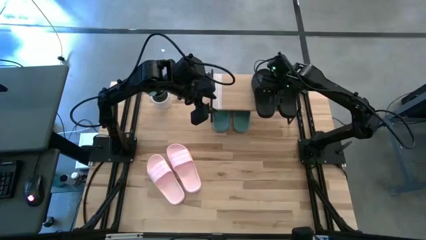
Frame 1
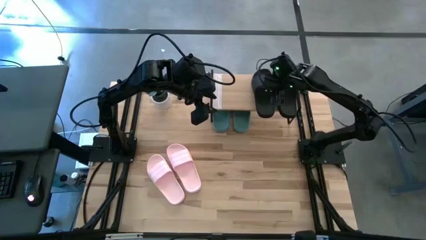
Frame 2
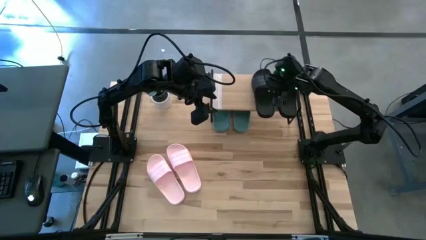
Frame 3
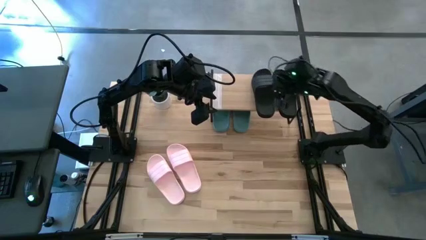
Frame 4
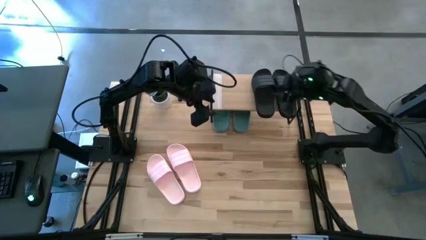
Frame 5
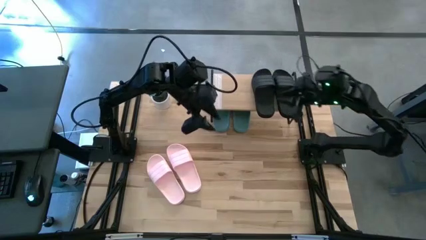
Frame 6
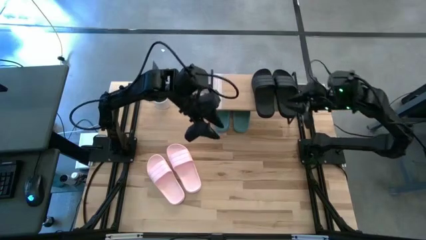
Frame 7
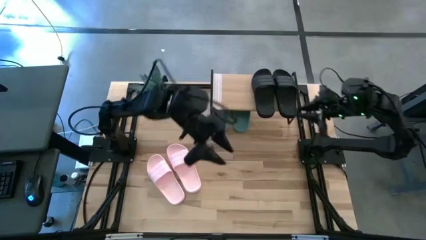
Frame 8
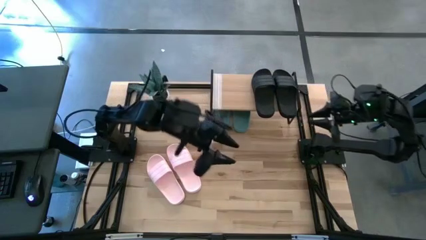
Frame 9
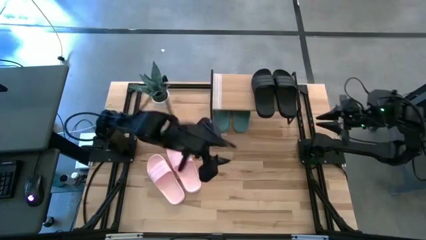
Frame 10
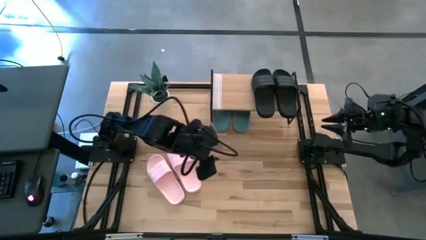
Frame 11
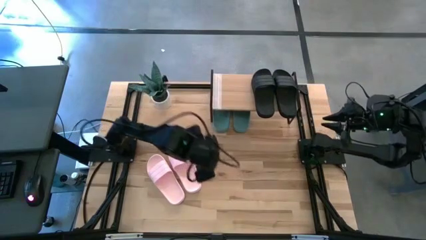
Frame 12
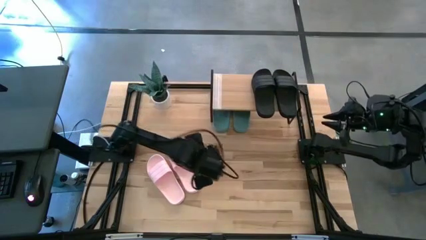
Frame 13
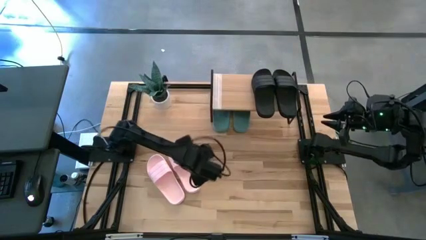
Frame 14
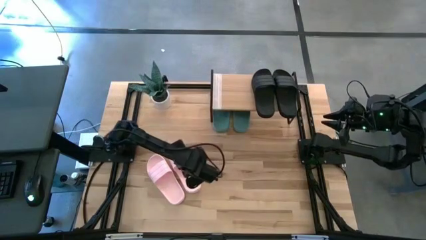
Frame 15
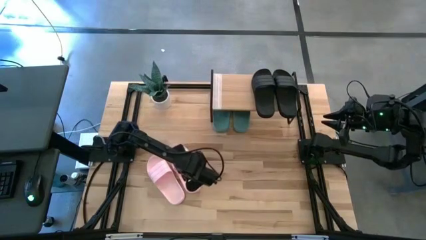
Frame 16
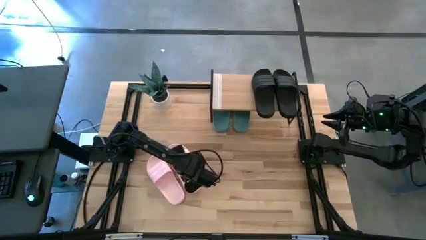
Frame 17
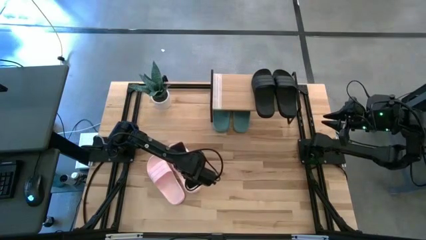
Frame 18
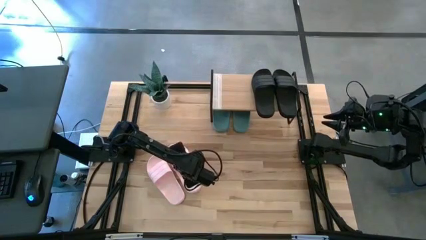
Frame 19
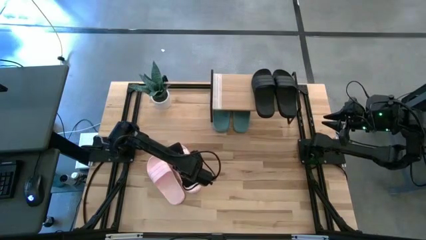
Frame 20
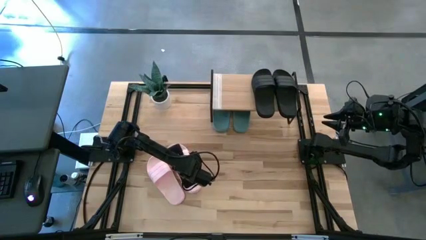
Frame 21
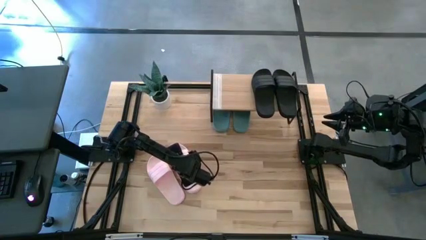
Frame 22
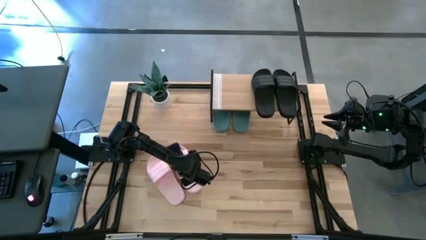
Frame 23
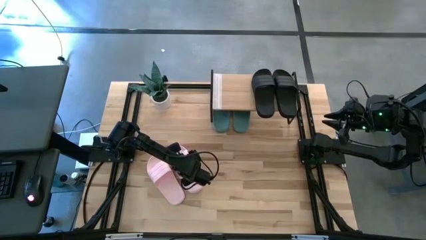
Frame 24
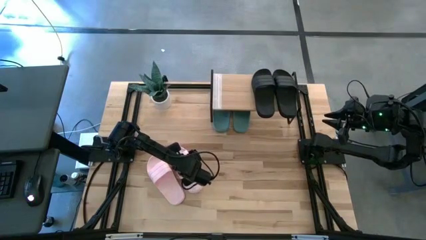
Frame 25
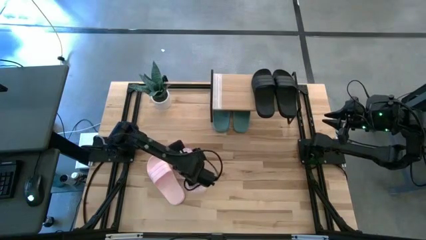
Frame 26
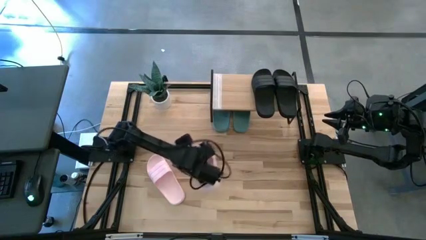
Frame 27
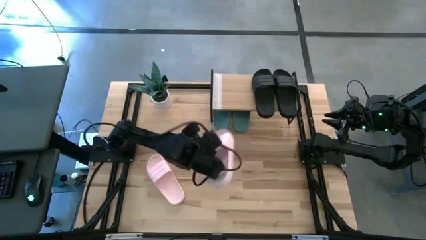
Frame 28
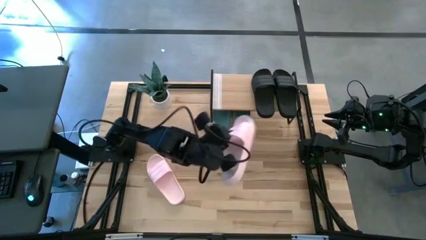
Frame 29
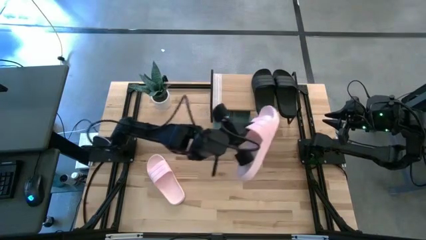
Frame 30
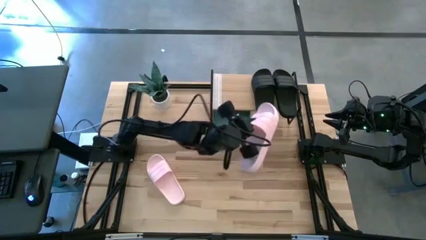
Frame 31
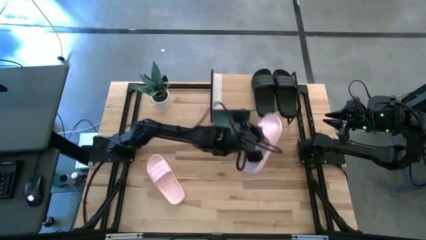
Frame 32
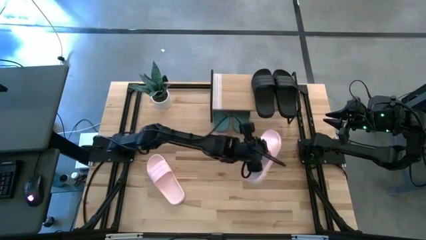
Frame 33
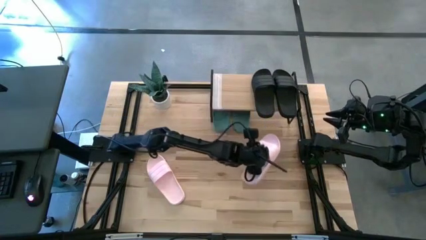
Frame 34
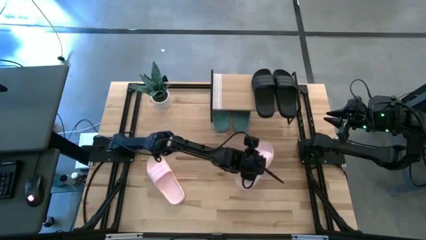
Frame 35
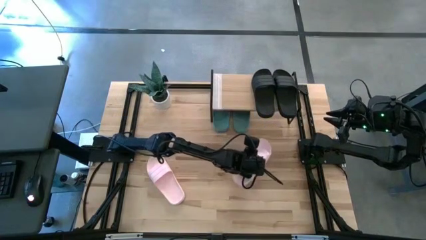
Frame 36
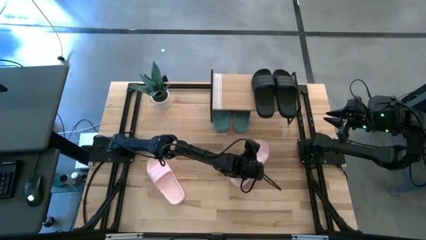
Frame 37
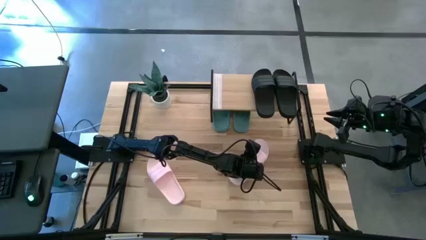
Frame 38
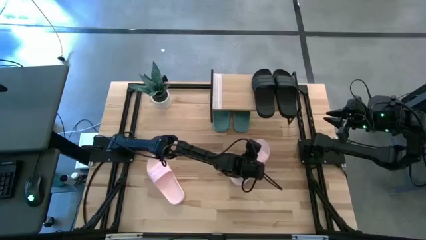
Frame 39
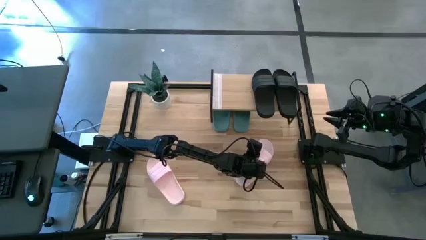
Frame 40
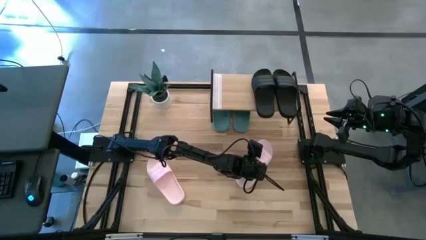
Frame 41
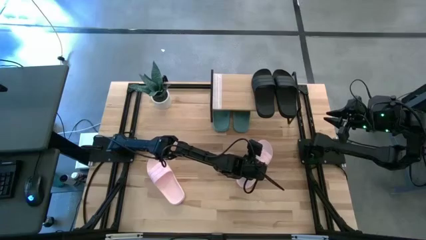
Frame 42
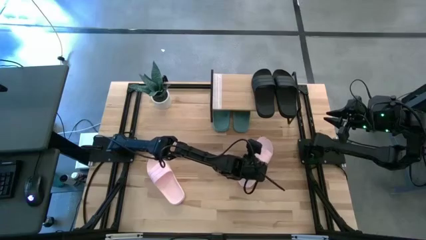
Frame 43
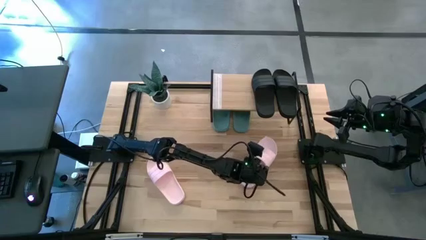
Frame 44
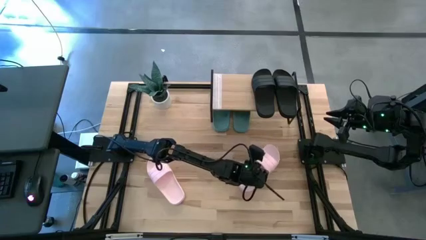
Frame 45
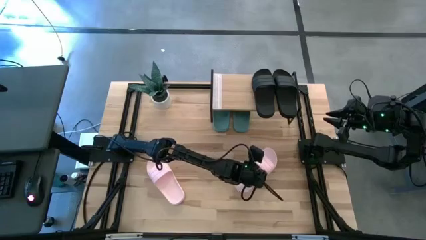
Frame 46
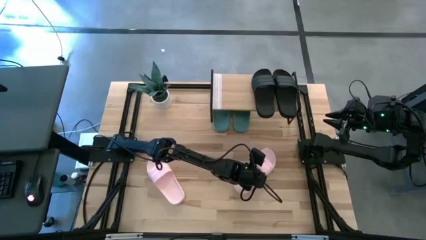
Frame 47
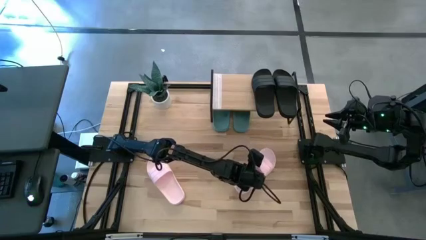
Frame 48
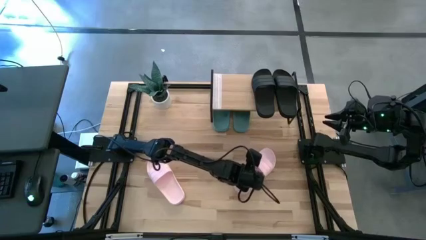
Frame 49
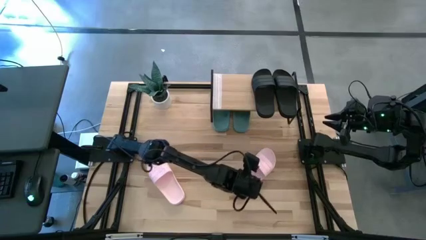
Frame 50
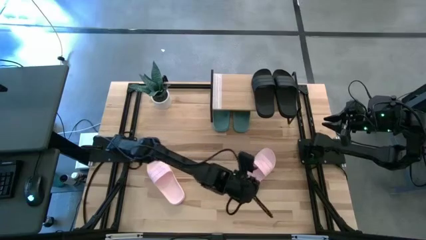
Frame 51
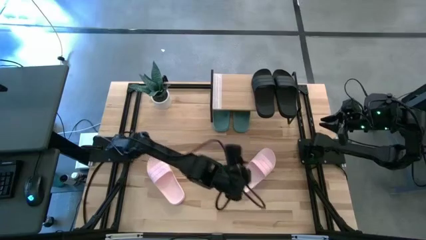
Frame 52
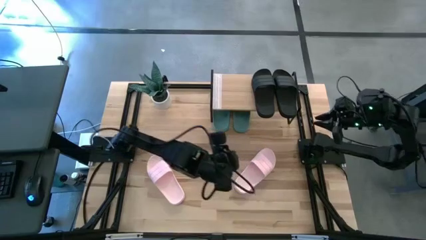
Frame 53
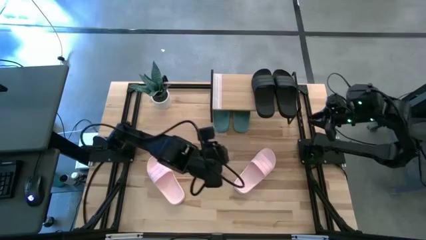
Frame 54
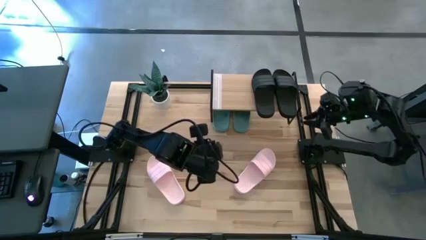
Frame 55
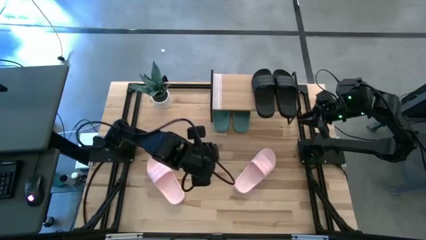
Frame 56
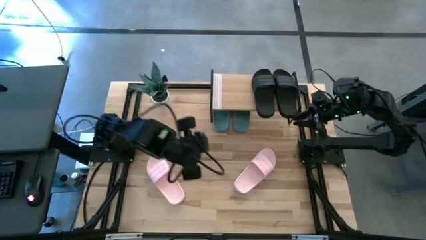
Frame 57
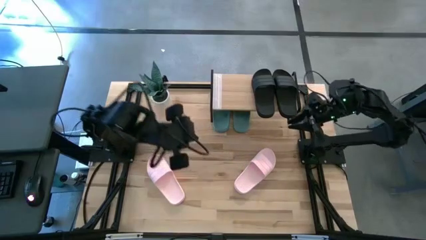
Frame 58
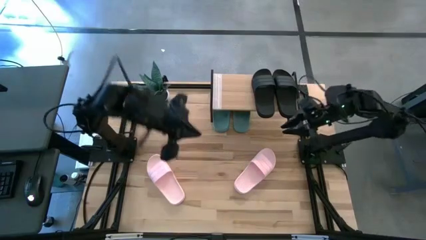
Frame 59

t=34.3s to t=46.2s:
Task: Pick and place slides into the shelf
Move the right pink slipper under the shelf

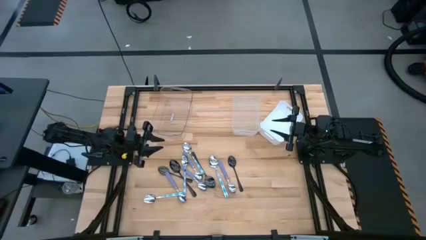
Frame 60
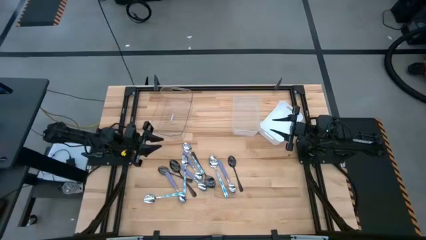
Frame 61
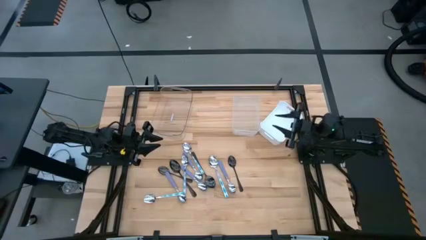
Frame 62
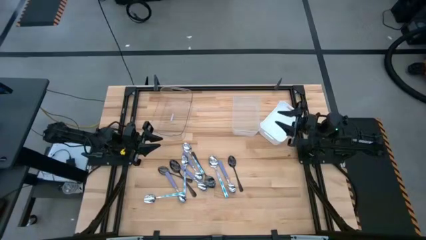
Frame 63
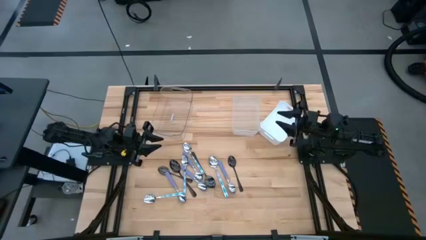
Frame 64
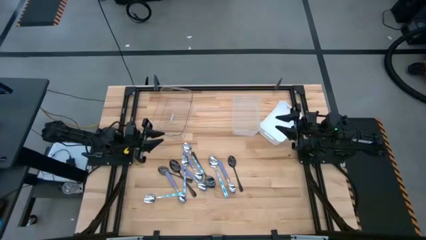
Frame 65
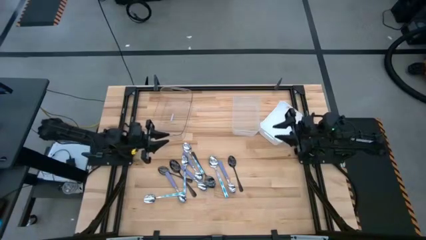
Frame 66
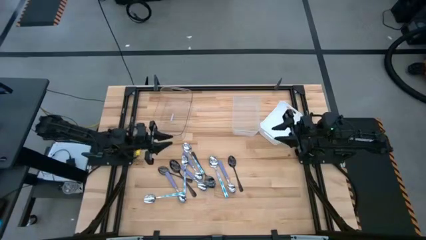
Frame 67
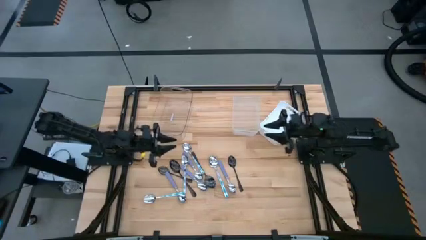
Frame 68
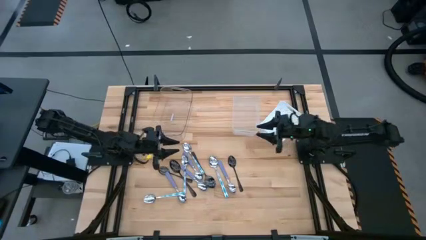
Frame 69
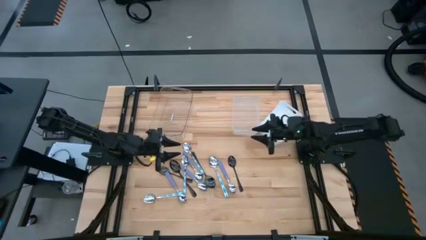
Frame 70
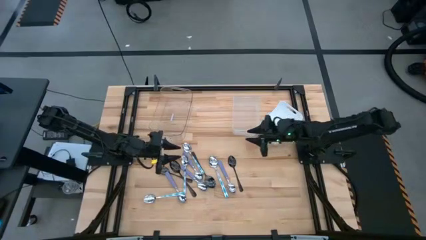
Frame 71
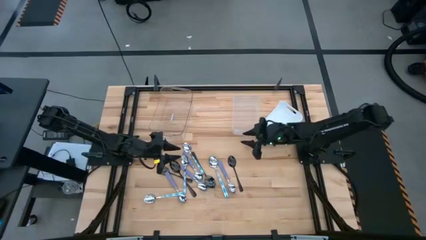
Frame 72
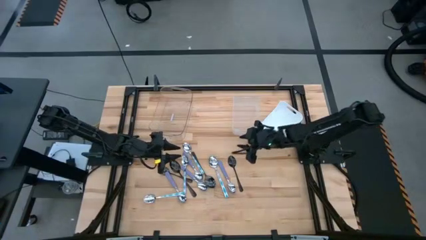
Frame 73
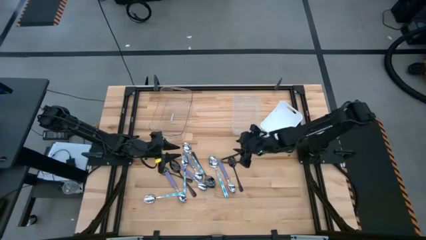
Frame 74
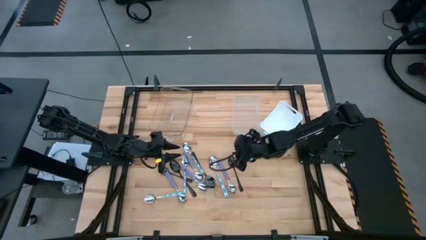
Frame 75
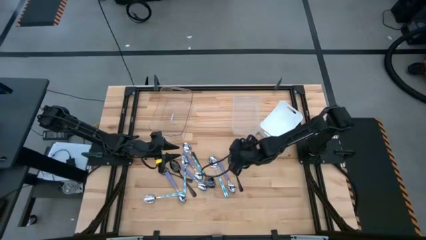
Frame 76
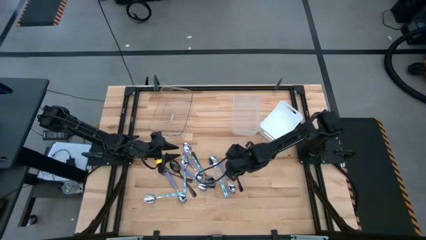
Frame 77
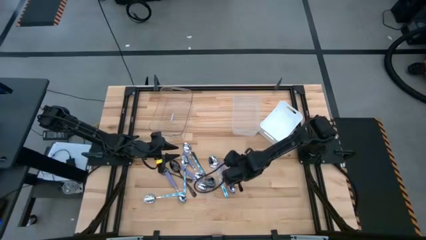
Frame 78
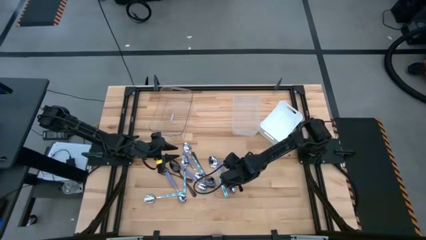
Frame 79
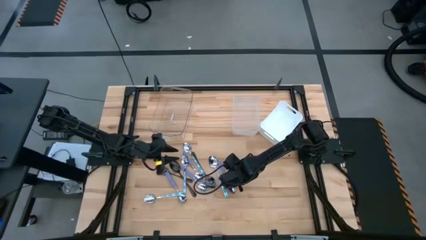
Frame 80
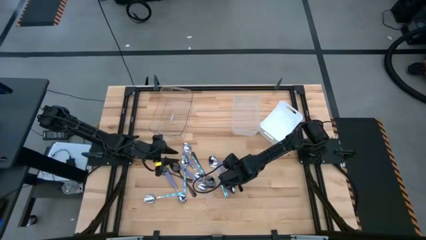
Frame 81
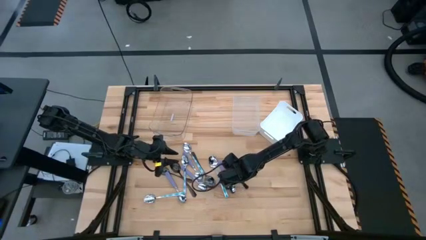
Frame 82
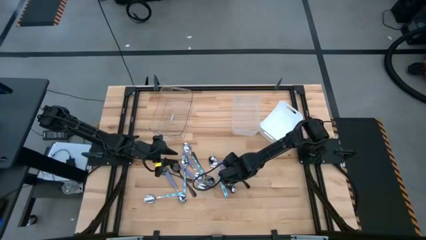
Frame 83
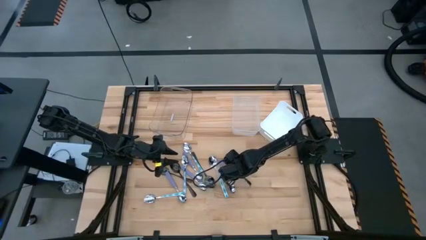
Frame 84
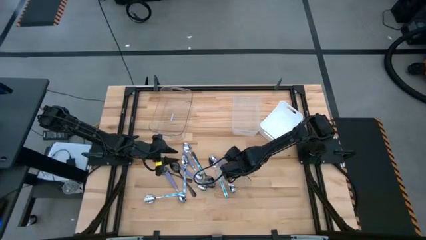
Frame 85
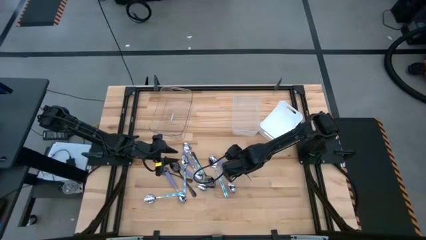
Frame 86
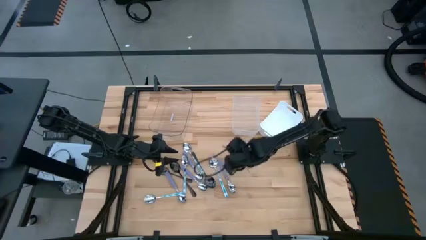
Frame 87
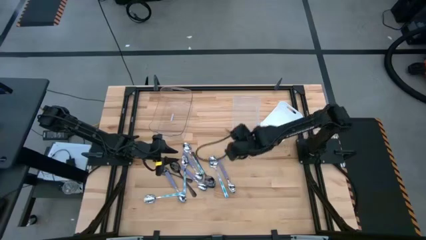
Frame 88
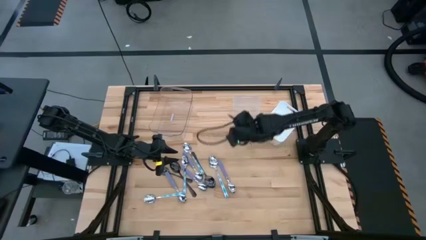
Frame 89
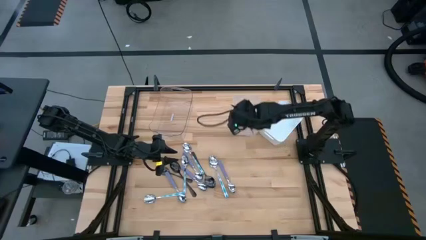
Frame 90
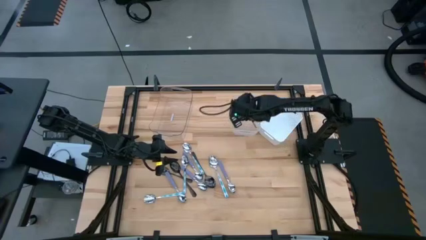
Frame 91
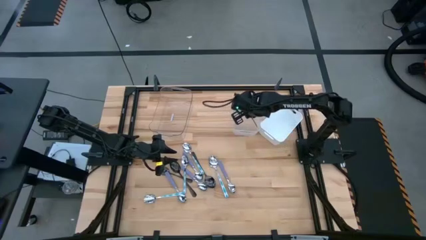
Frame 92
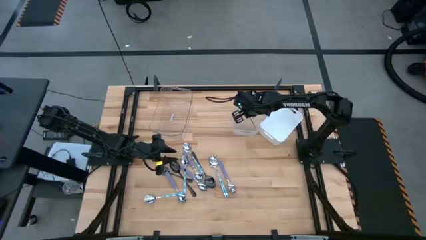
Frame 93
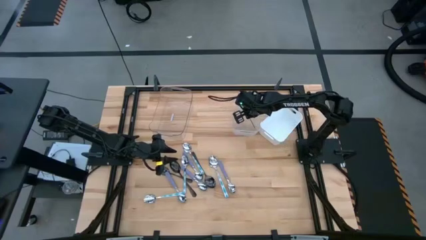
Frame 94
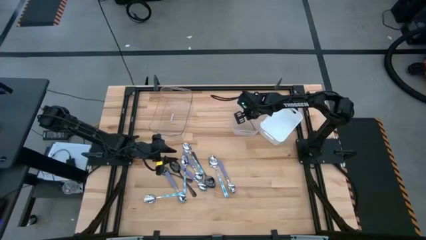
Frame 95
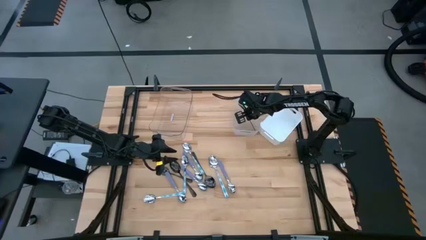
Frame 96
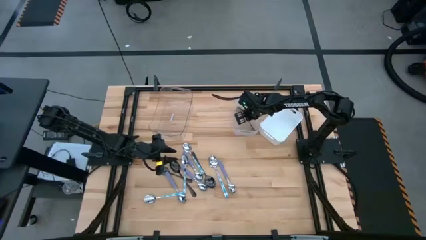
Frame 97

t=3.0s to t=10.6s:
Task: Sort silverware by color (type)
Put the black spoon into the transparent white bin
